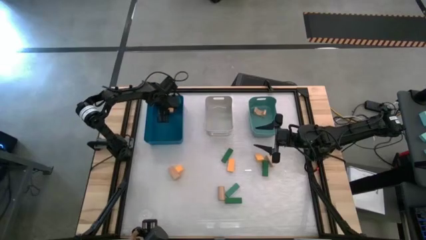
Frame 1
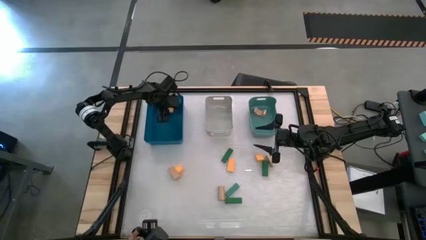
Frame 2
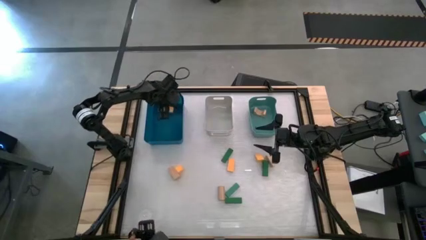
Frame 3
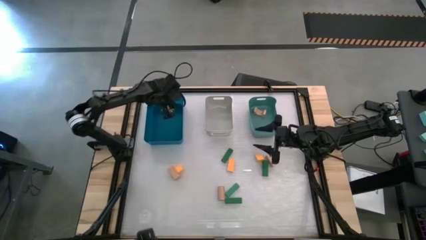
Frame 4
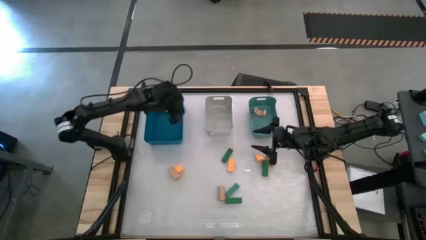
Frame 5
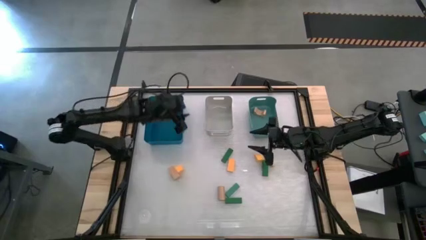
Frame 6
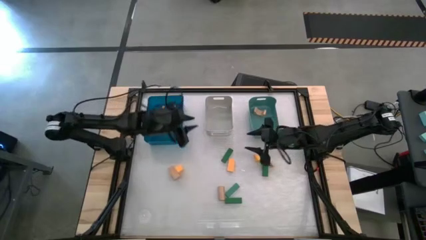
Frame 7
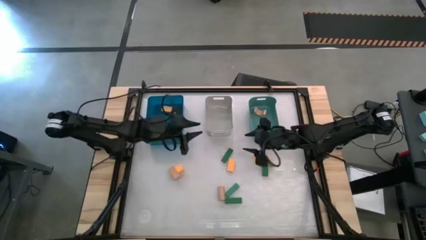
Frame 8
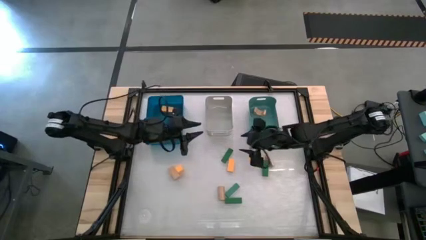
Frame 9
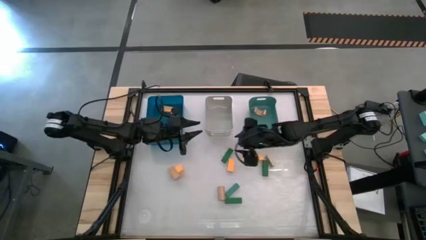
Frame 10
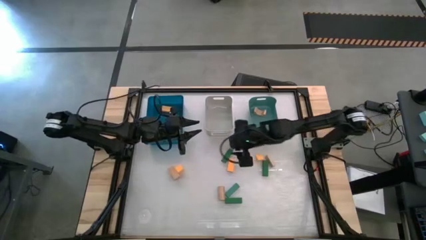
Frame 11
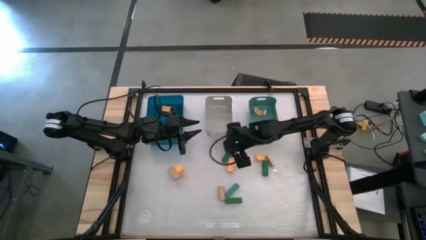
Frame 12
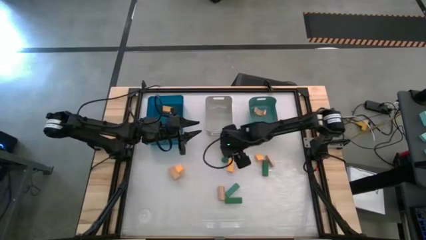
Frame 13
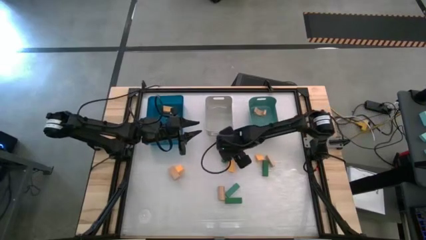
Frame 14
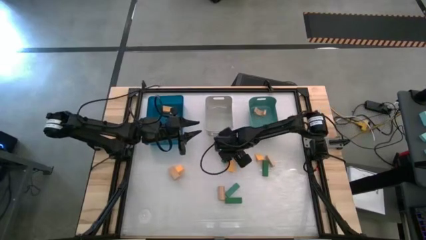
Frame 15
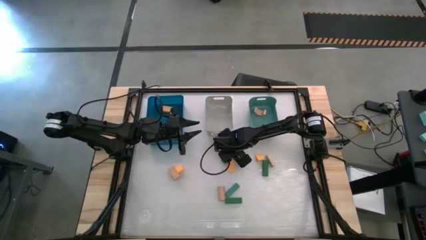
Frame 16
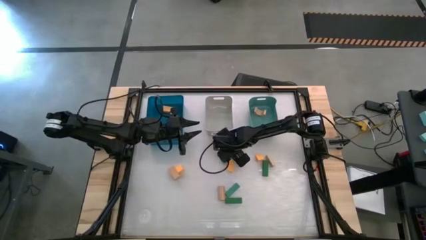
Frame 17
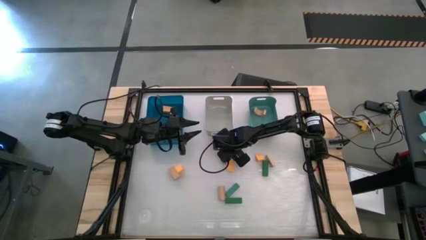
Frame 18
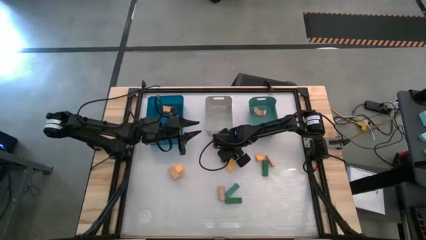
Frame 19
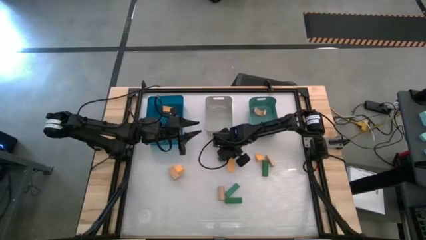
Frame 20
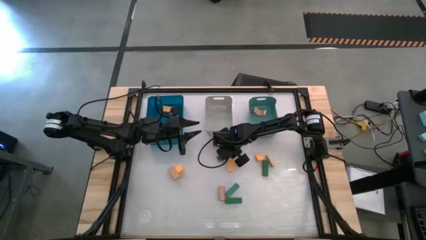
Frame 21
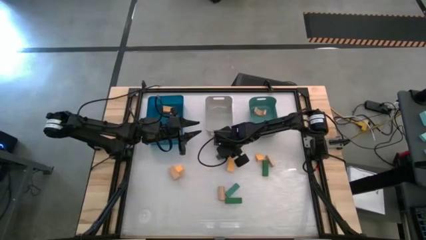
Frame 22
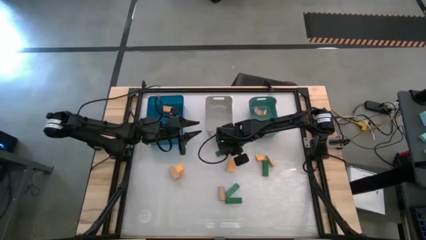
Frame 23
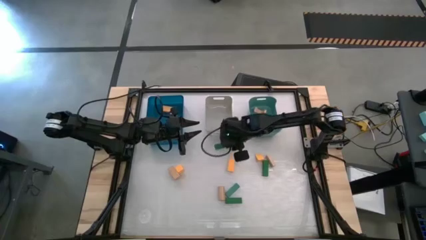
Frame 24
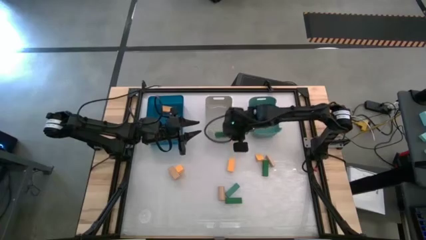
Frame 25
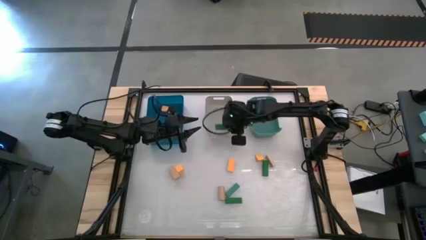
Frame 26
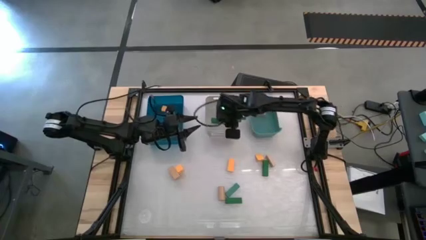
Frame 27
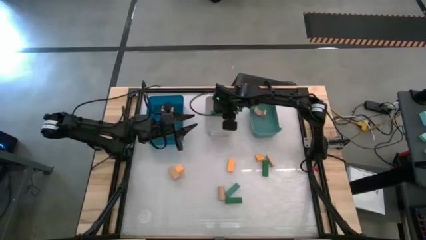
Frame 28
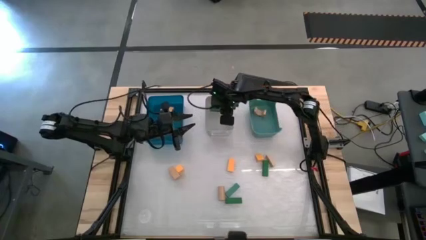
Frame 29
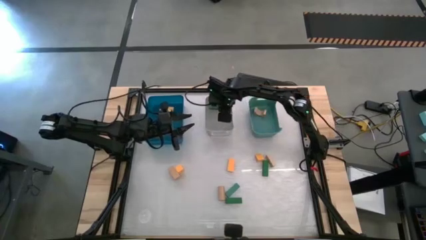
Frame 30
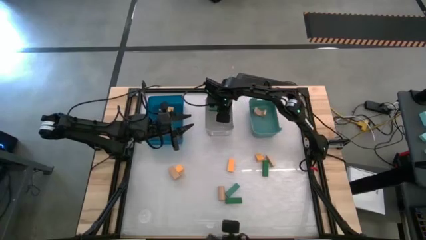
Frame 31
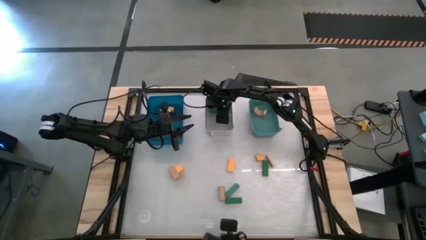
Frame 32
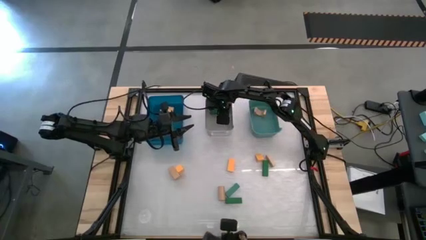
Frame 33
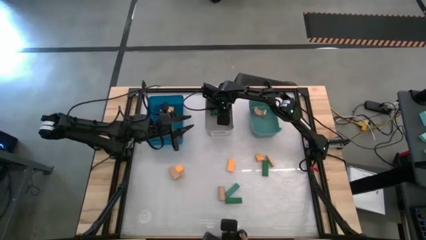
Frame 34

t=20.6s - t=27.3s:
Task: Sort & place blocks by color
Put the green block into the gray bin

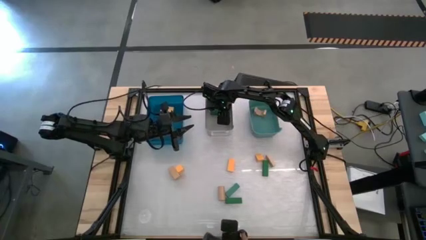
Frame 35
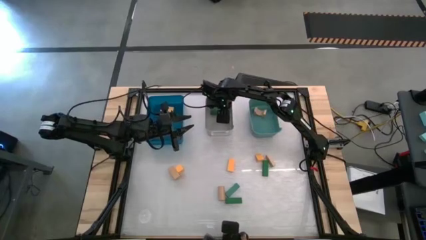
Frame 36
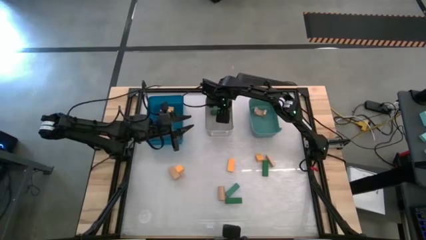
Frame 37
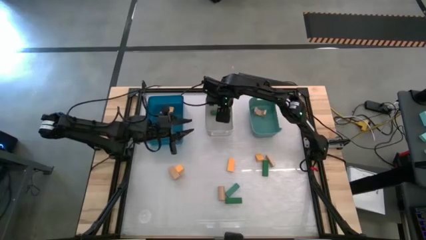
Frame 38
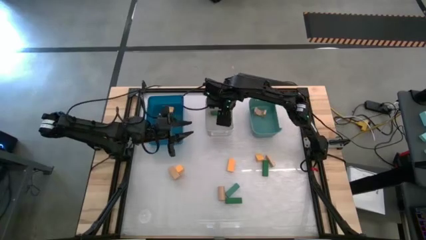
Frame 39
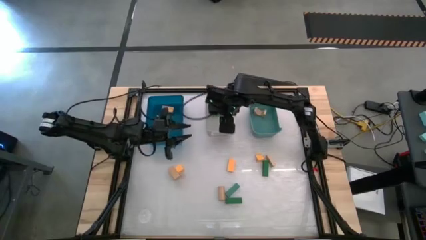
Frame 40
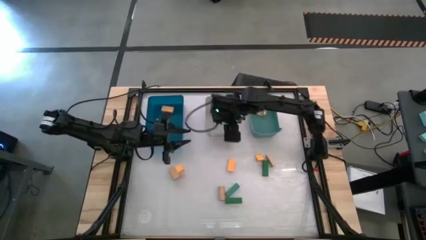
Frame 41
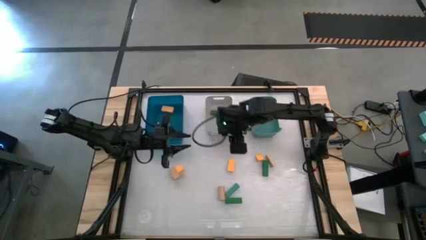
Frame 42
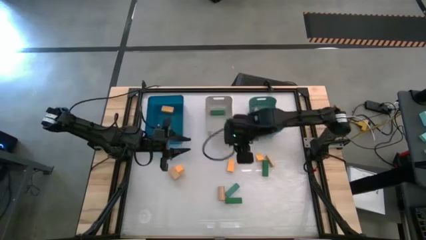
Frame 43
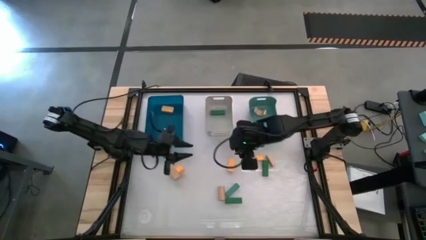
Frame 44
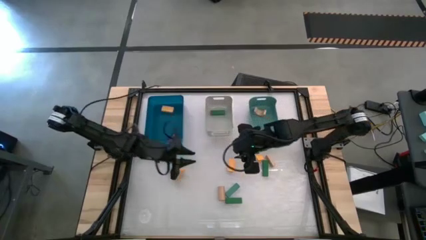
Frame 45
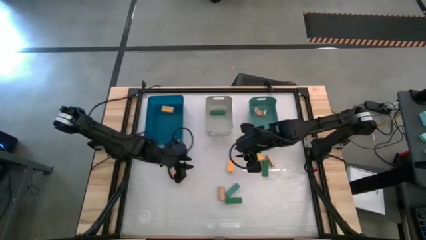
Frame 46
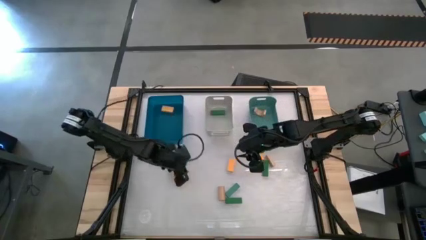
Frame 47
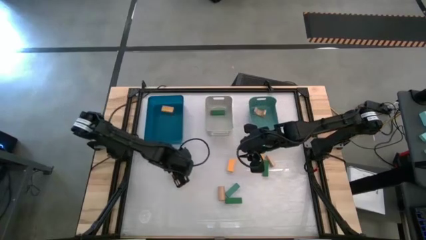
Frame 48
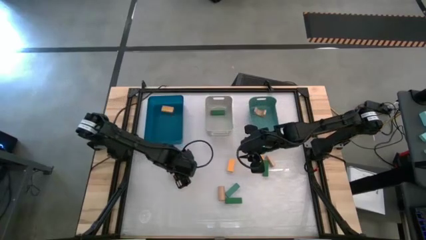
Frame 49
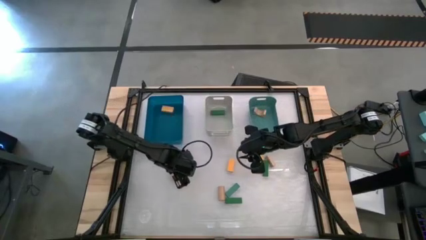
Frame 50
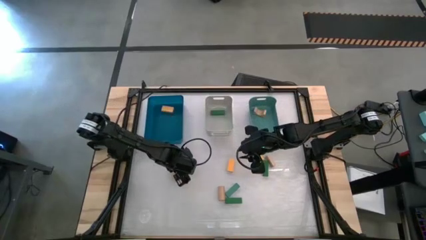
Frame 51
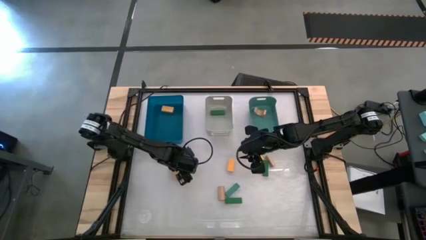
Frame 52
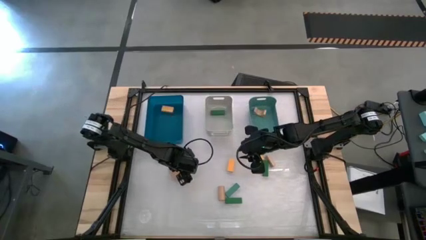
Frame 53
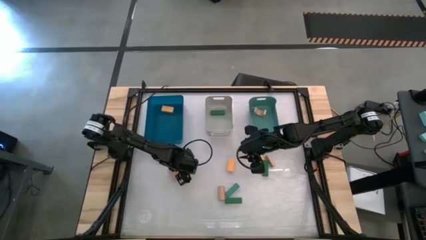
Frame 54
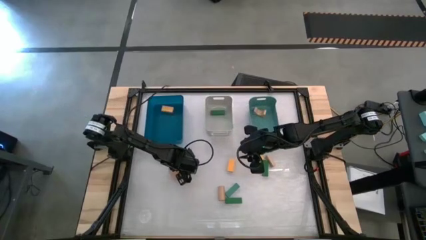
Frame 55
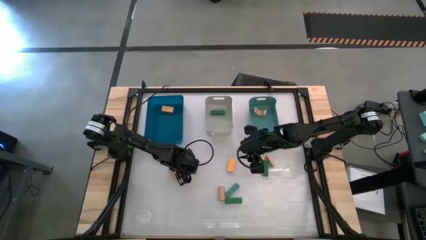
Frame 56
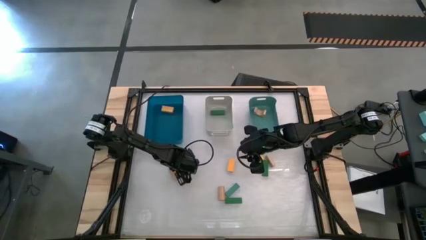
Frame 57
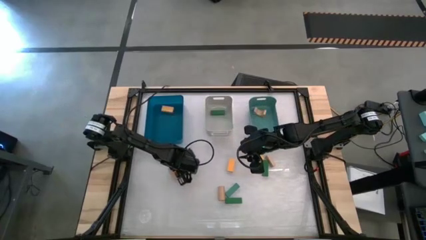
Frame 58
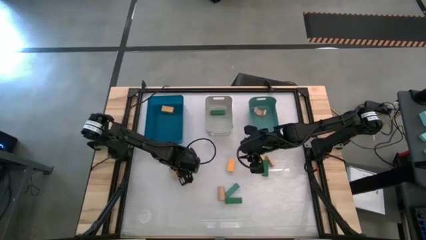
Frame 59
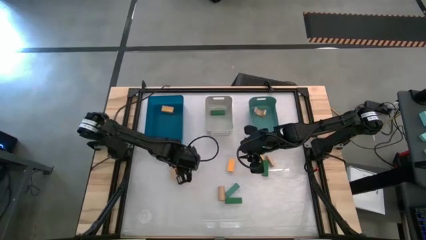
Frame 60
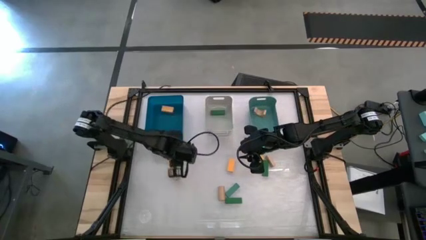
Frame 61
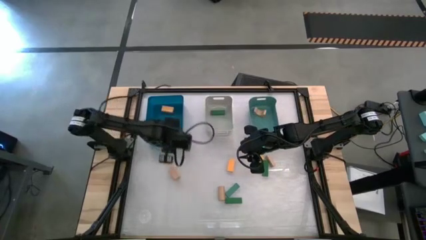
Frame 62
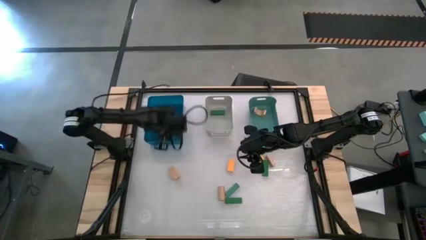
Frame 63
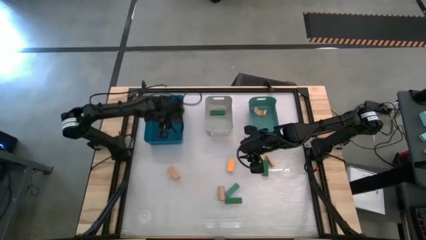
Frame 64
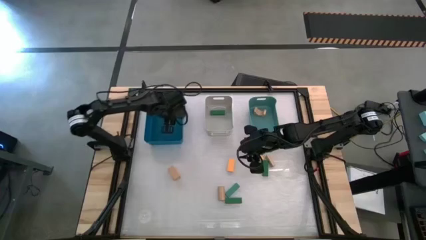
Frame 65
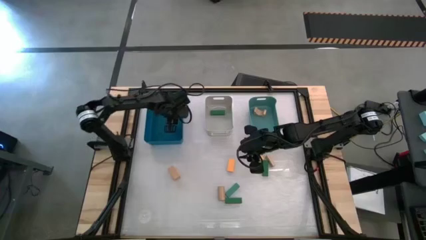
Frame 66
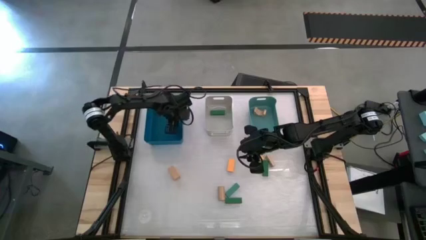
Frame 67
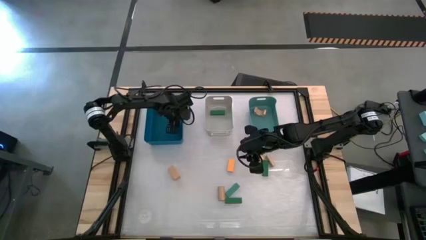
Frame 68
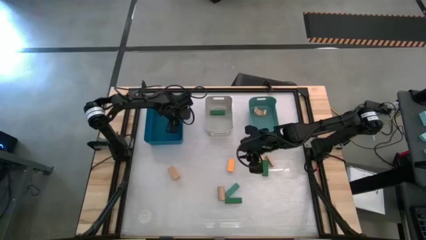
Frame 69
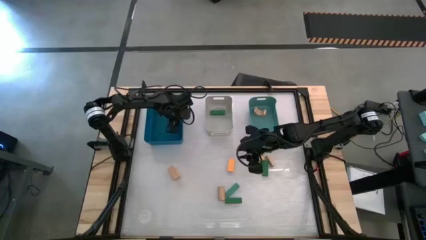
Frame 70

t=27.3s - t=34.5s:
Put the yellow block into the blue bin

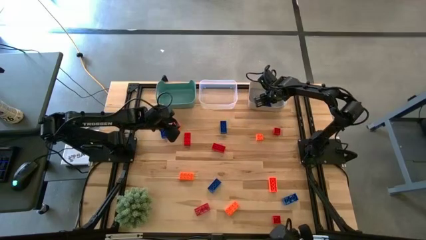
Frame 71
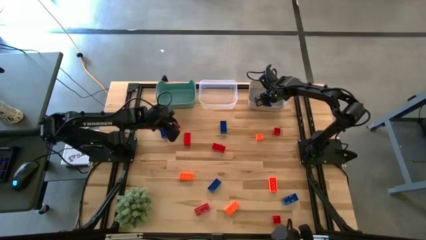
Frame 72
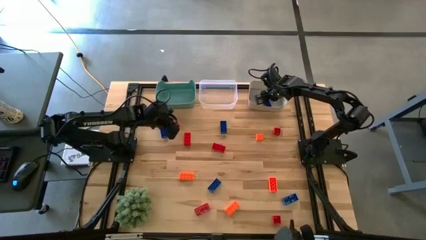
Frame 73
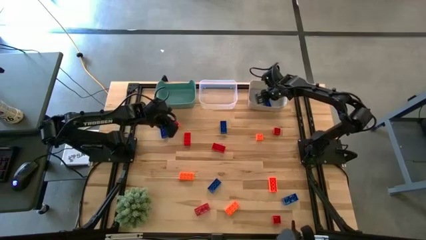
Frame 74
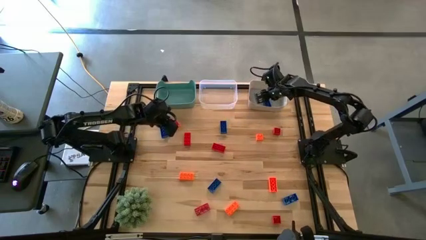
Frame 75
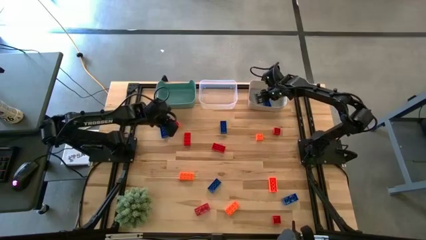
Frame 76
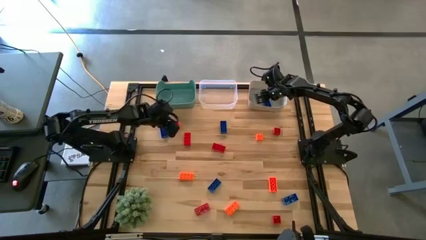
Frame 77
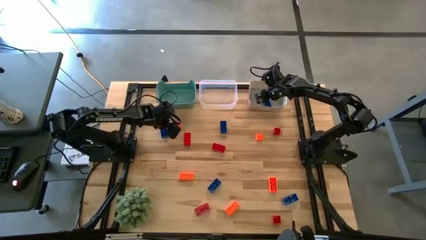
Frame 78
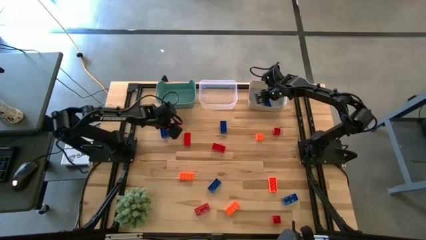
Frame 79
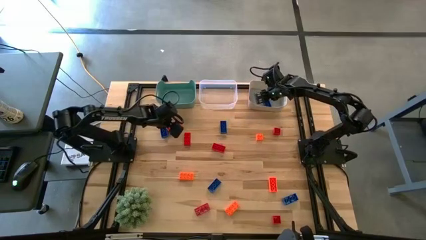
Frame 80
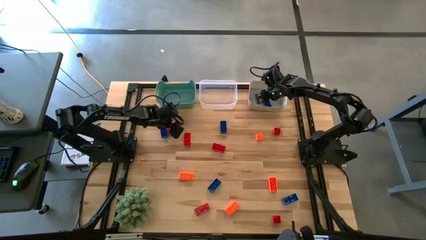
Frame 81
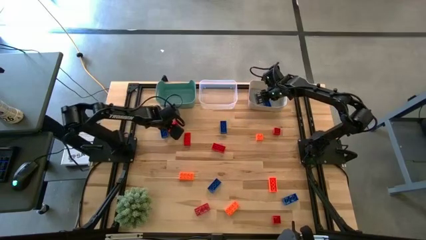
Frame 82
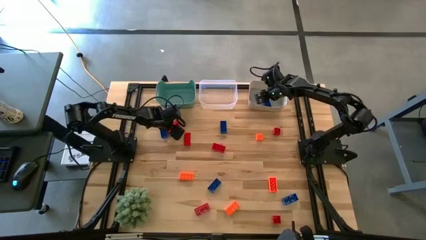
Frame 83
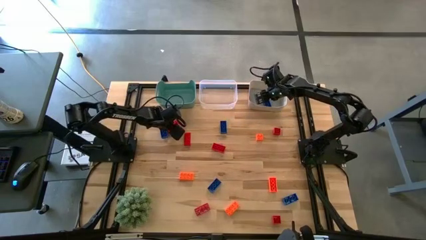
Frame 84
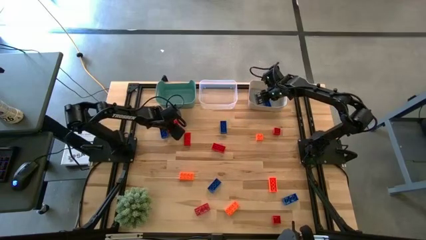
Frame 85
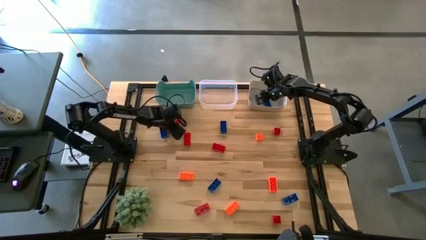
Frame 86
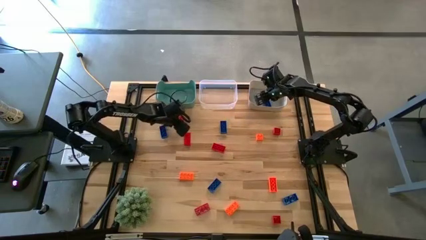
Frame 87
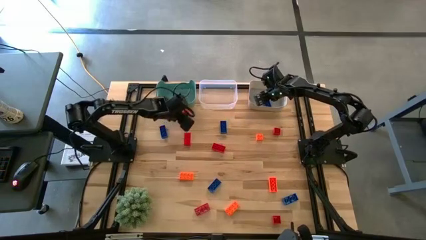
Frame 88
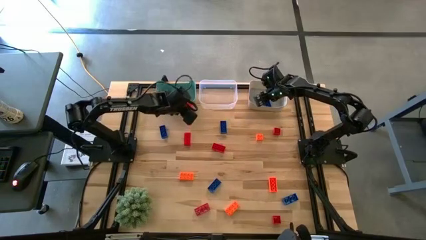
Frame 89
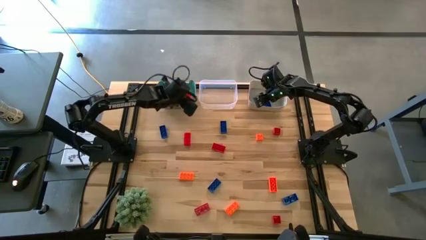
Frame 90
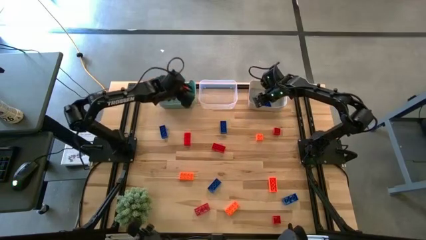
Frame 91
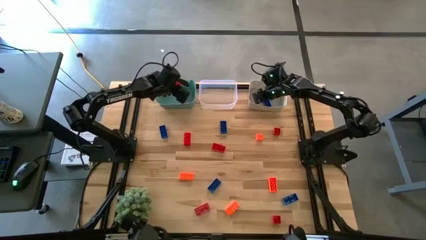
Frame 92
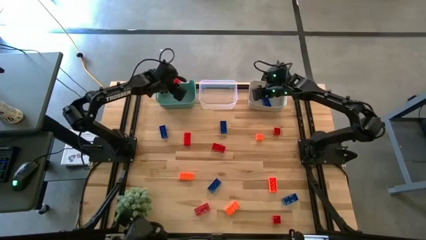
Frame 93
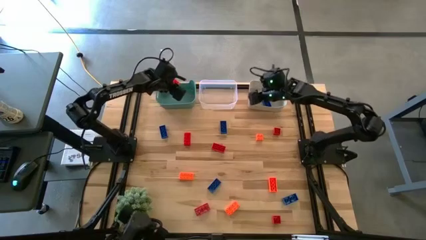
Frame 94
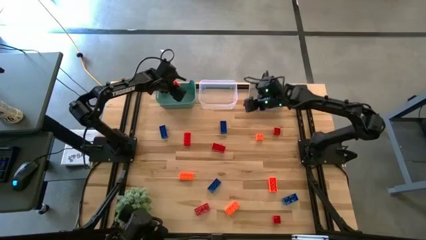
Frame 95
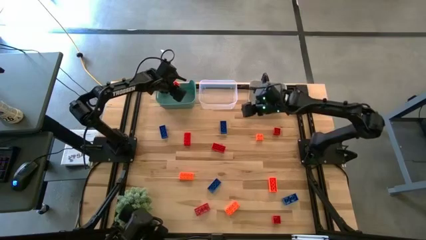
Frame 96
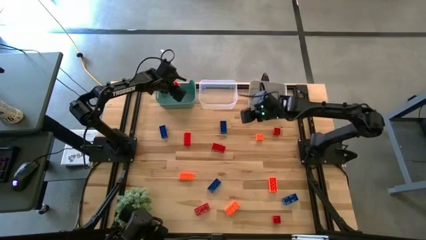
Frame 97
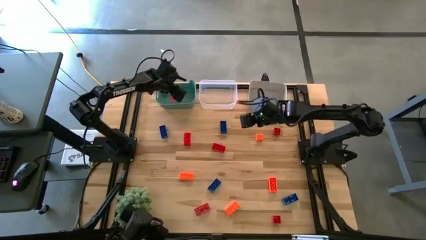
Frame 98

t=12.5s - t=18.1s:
Task: Sort & place blocks by color
Put the orange game piece into the green bin
